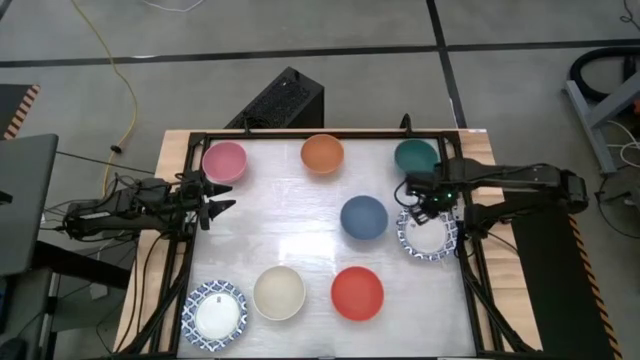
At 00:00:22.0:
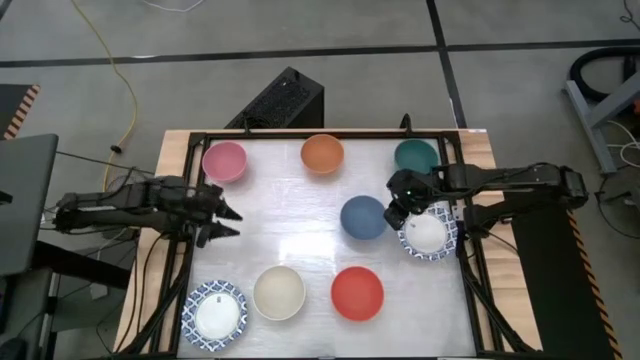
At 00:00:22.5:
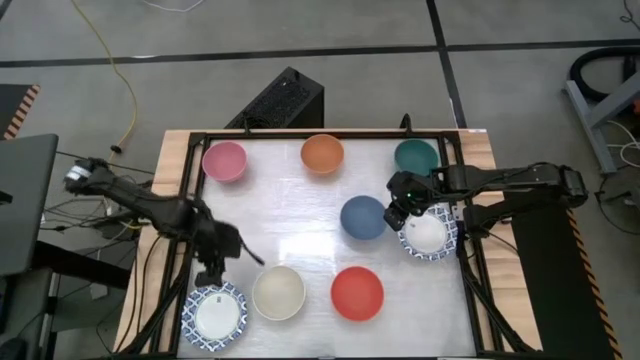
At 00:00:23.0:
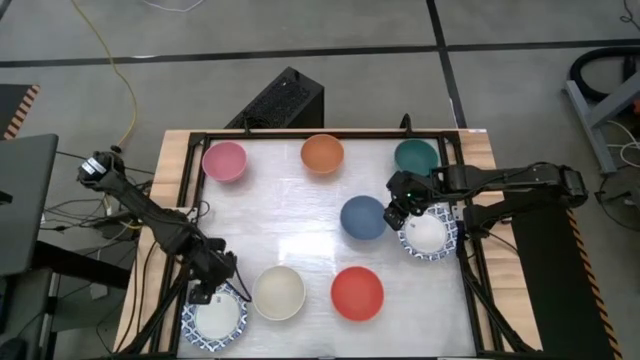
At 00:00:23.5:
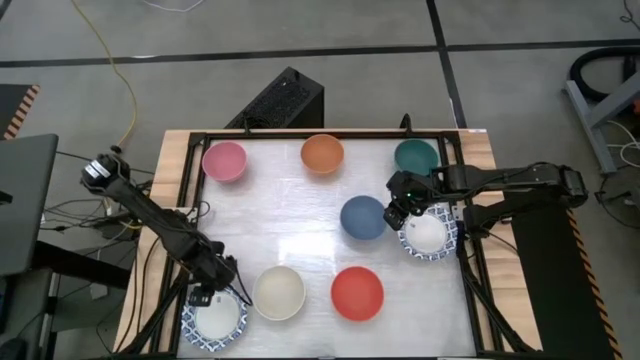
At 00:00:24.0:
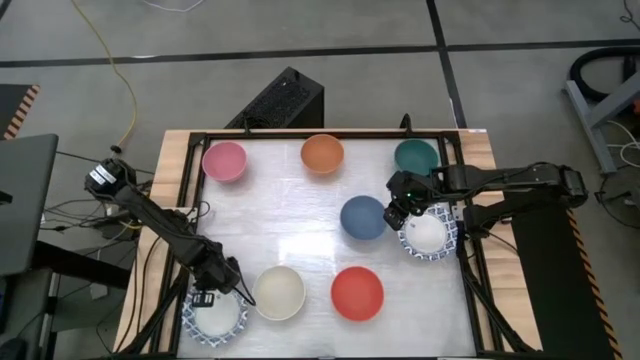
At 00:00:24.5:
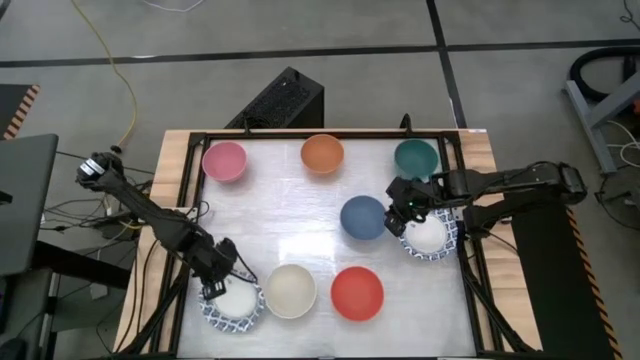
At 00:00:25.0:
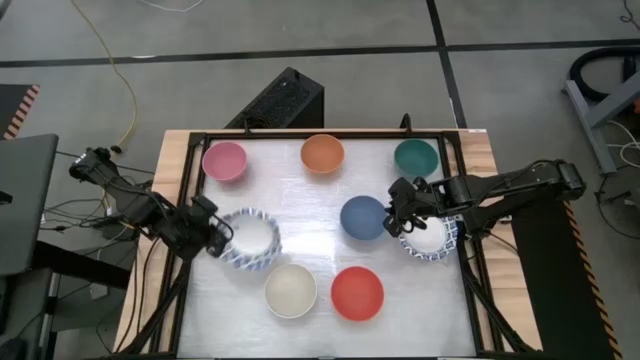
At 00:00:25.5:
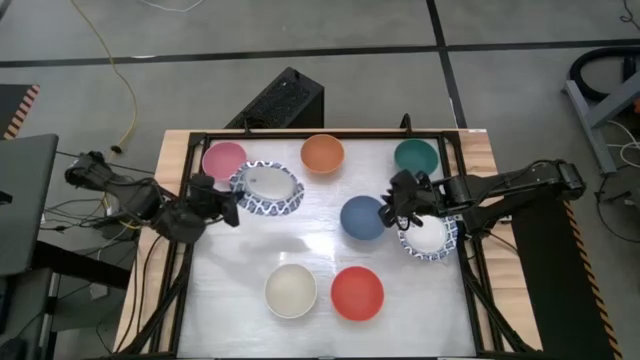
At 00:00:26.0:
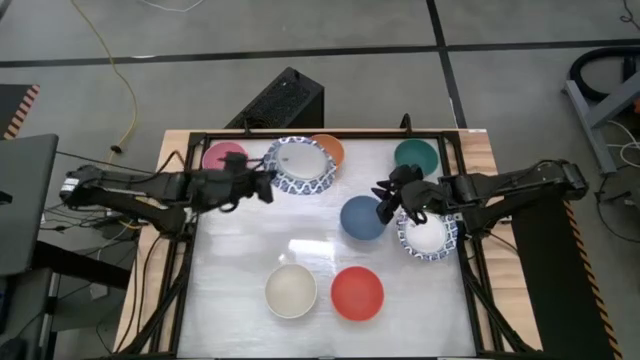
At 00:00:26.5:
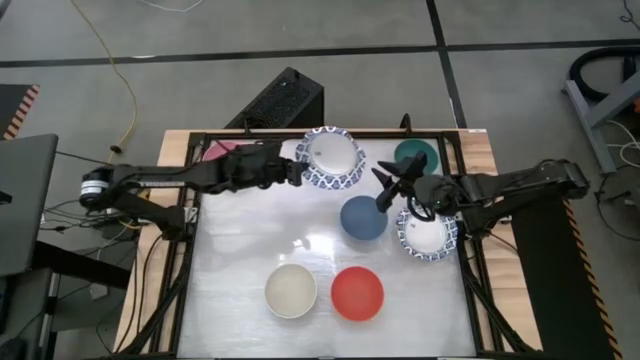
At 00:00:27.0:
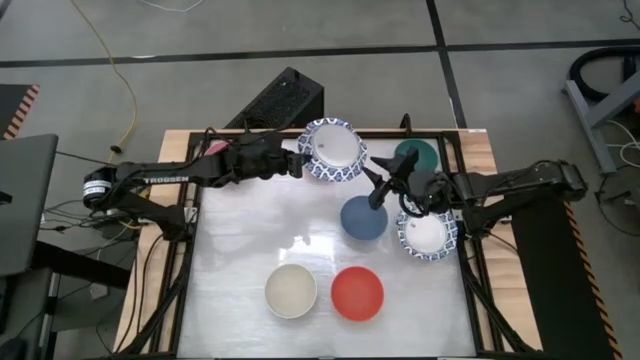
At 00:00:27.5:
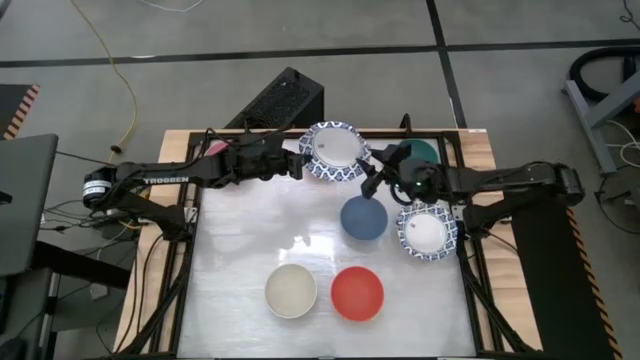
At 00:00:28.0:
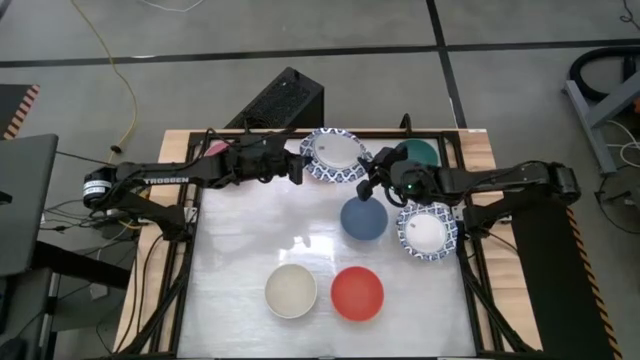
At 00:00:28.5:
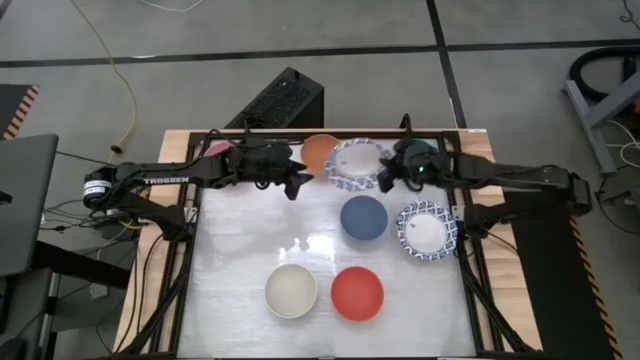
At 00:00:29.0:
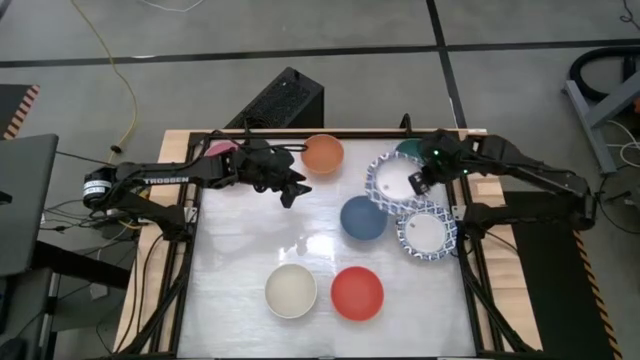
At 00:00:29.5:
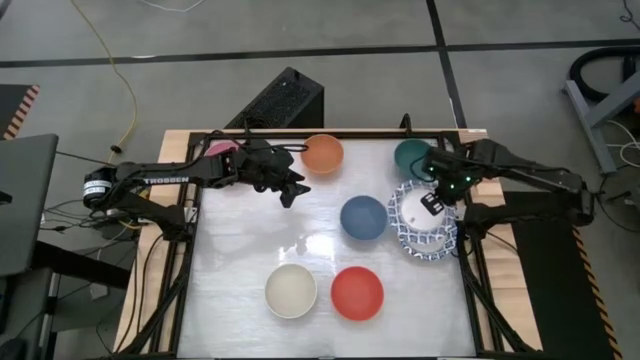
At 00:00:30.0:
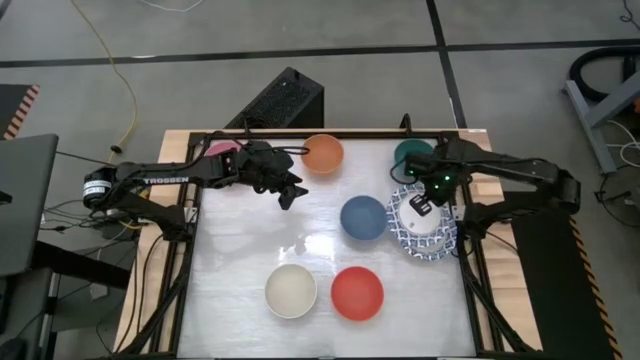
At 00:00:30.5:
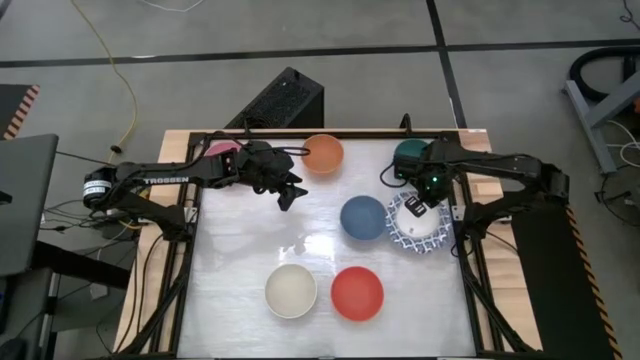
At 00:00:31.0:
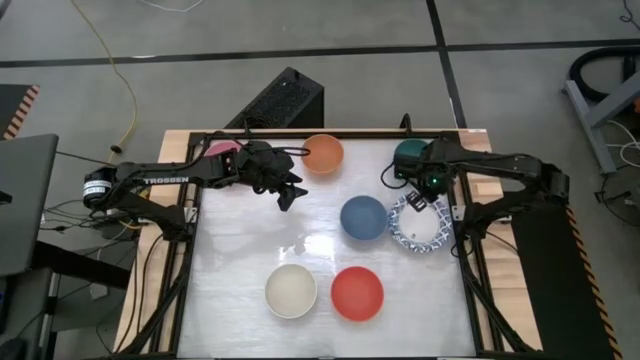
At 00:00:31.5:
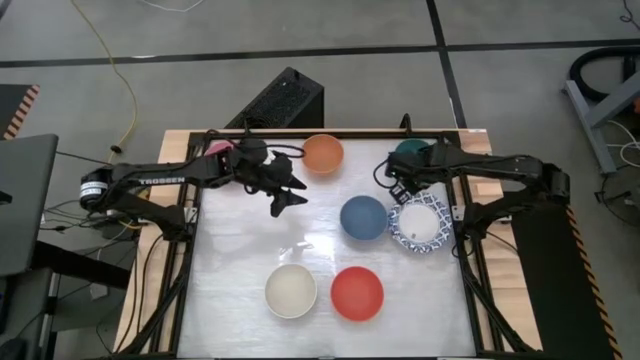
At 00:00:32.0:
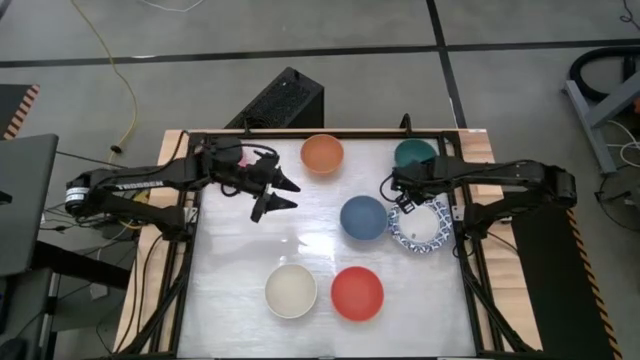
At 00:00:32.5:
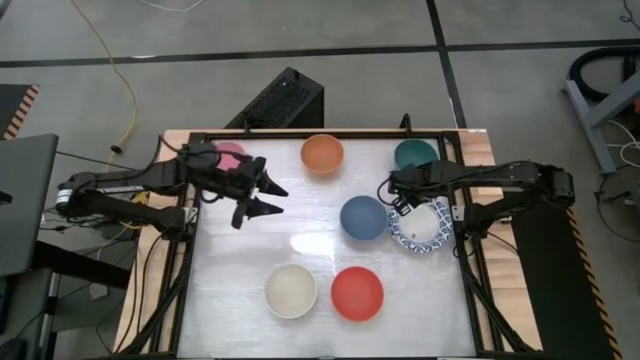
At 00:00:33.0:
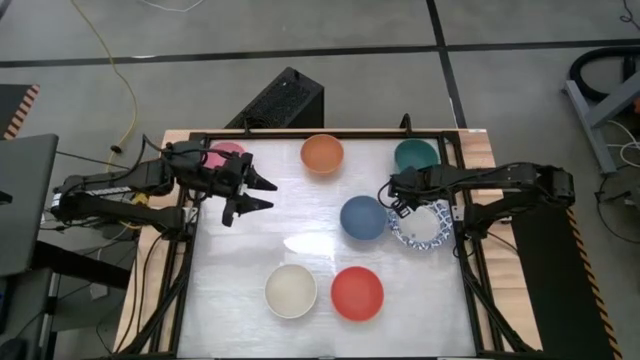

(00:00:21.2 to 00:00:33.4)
Stack the bottom white patterned plate on top of the stacked white patterned plates

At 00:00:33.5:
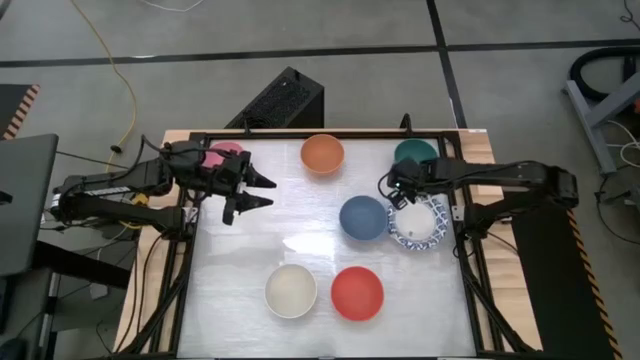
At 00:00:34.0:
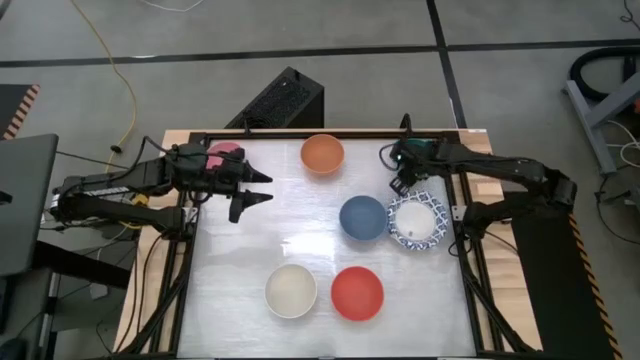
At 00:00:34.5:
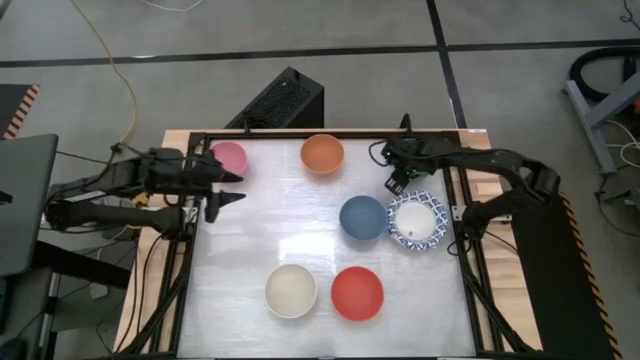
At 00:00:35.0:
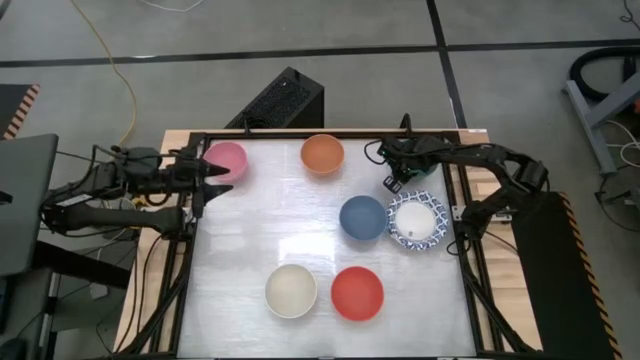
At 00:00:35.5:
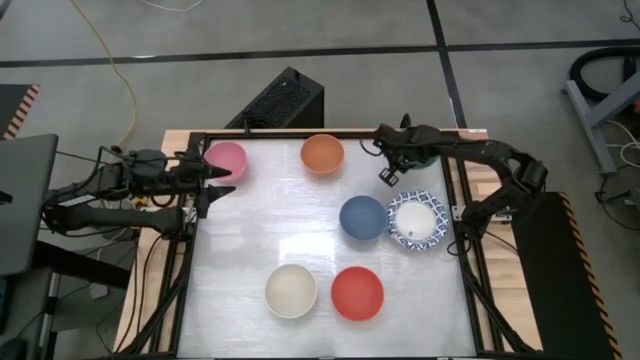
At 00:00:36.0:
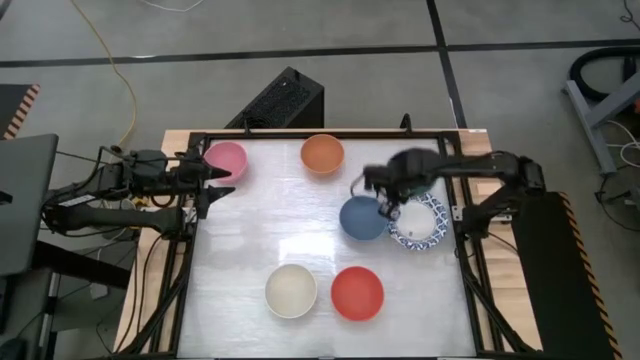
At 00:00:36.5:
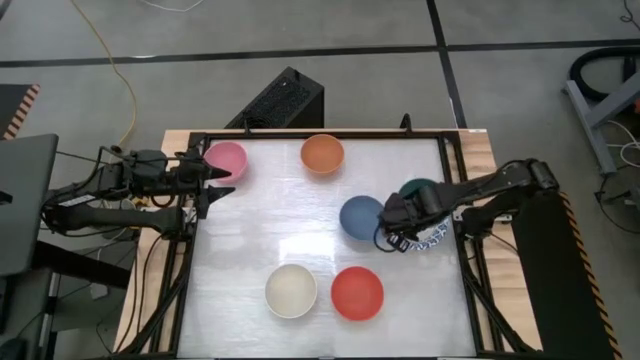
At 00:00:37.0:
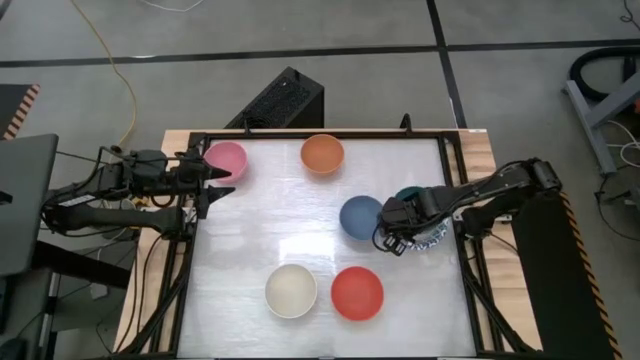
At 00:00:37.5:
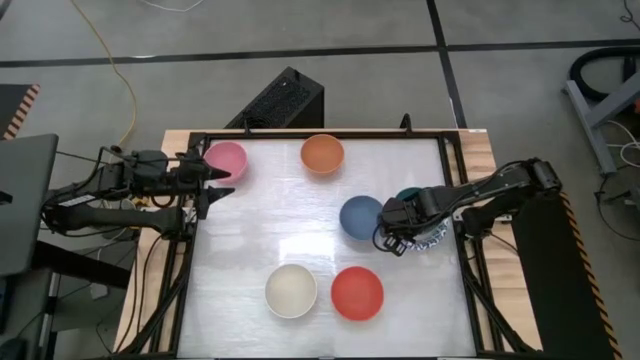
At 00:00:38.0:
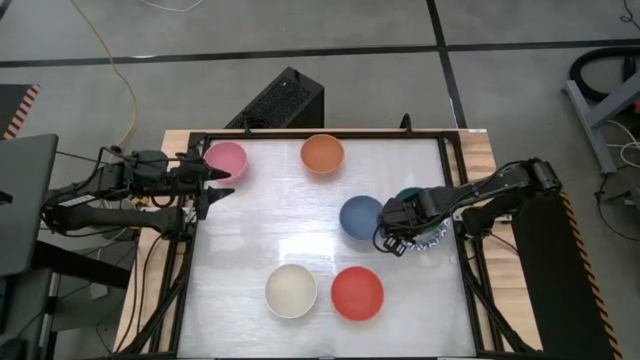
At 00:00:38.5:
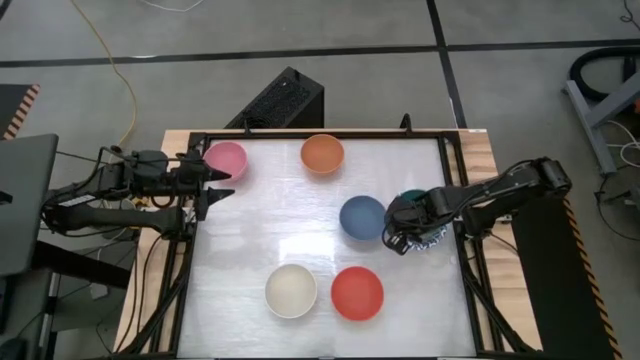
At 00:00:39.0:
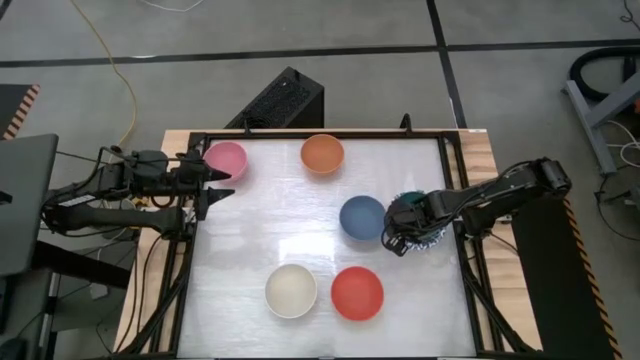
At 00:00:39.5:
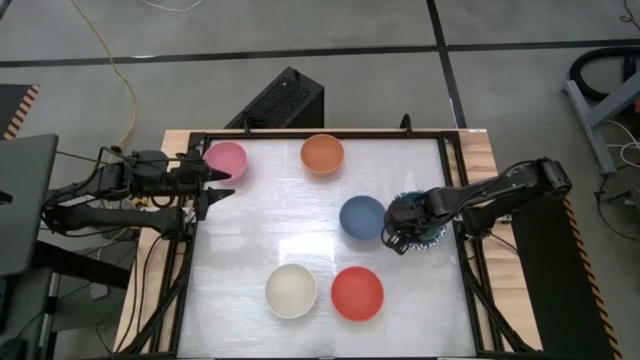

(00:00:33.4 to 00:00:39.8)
Stack the green bowl on top of the stacked white patterned plates
